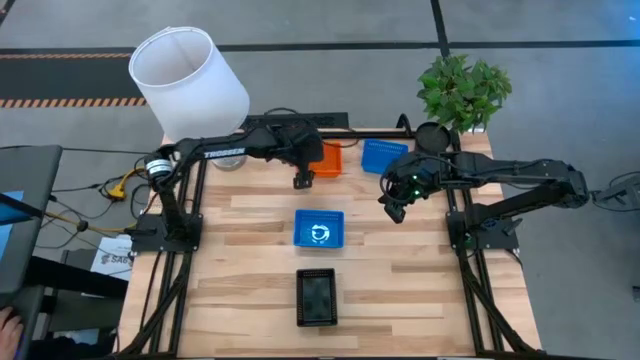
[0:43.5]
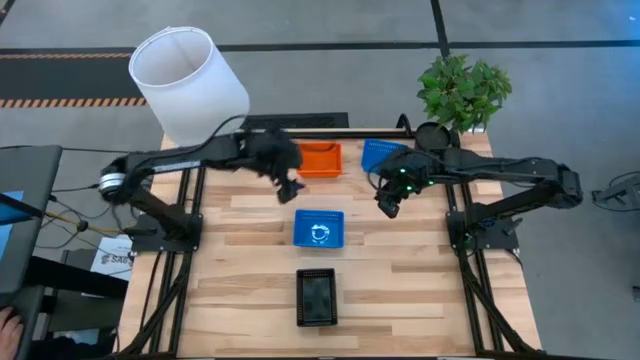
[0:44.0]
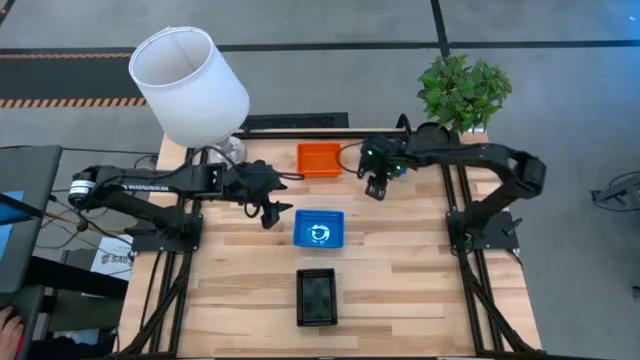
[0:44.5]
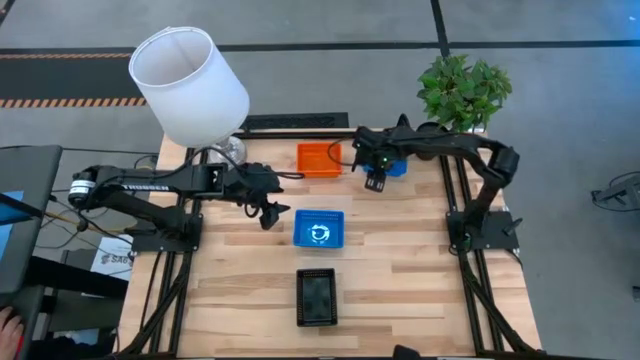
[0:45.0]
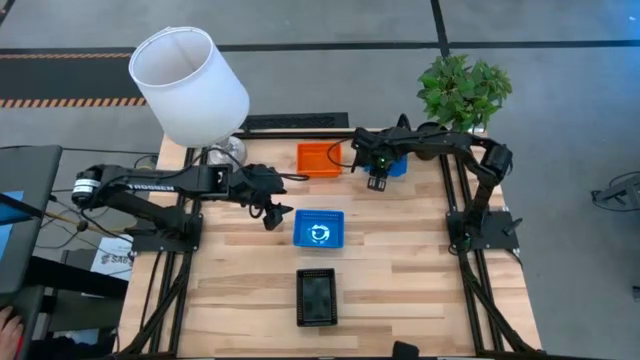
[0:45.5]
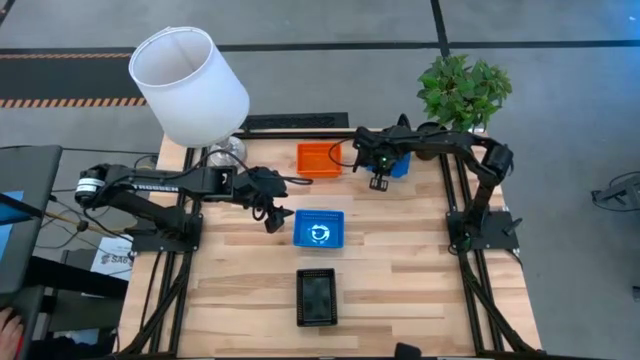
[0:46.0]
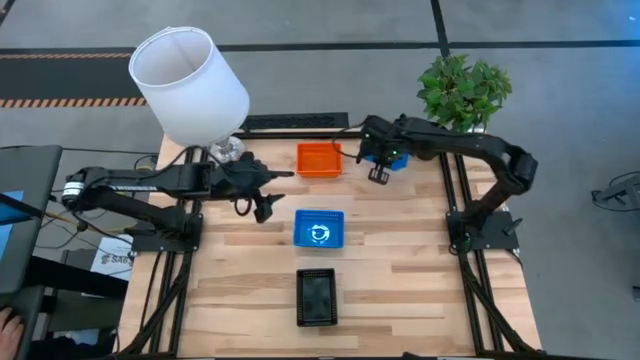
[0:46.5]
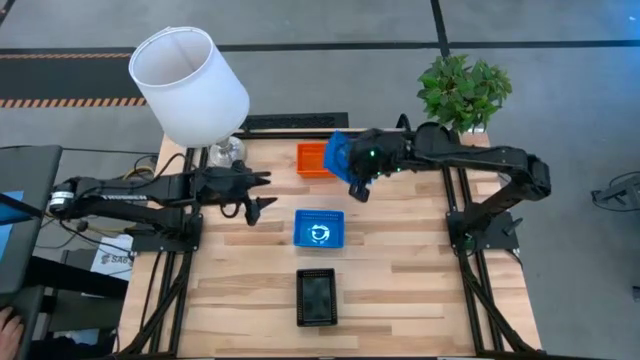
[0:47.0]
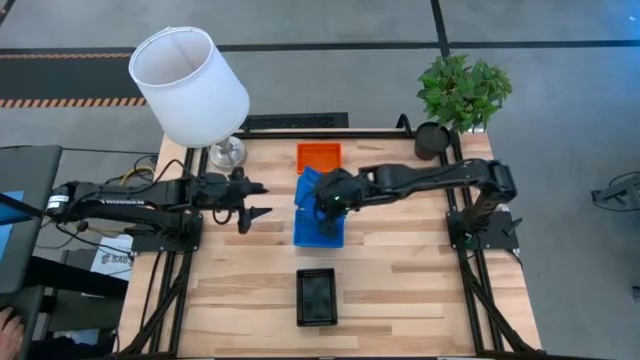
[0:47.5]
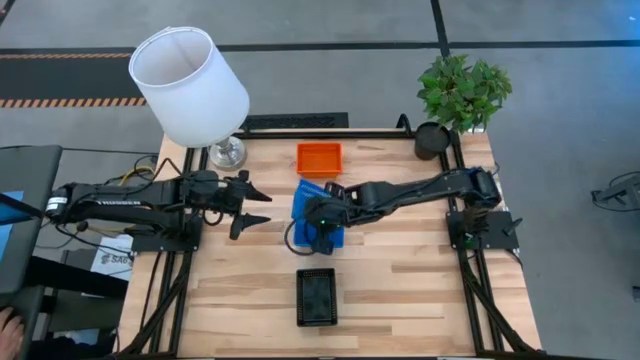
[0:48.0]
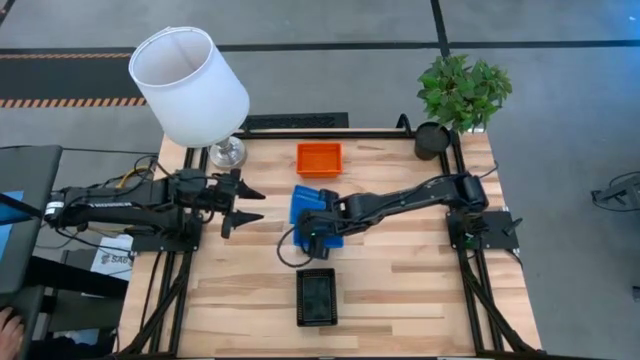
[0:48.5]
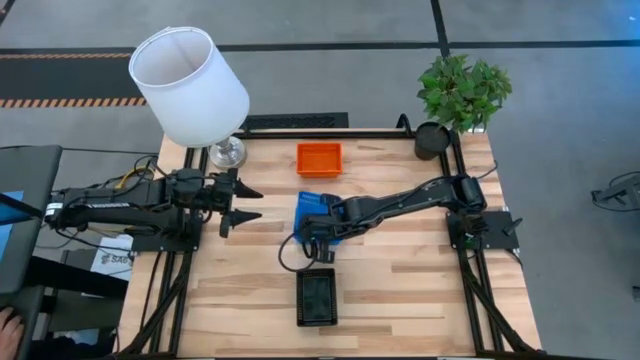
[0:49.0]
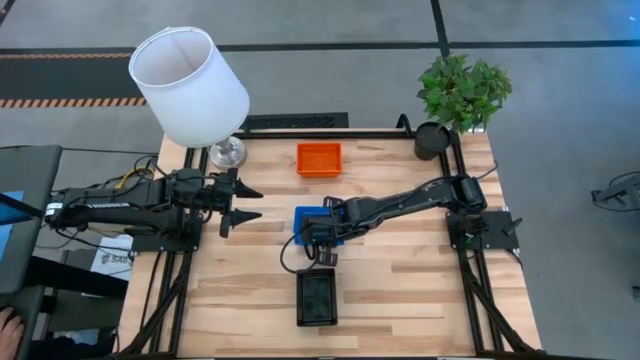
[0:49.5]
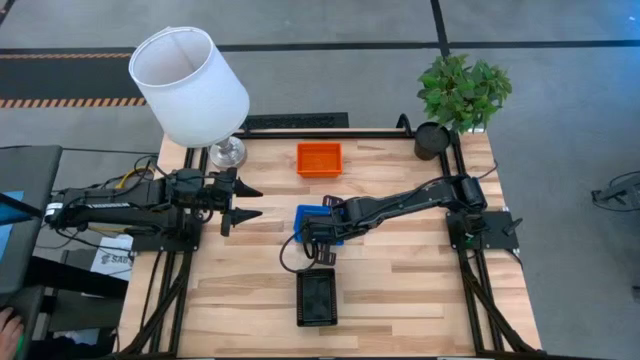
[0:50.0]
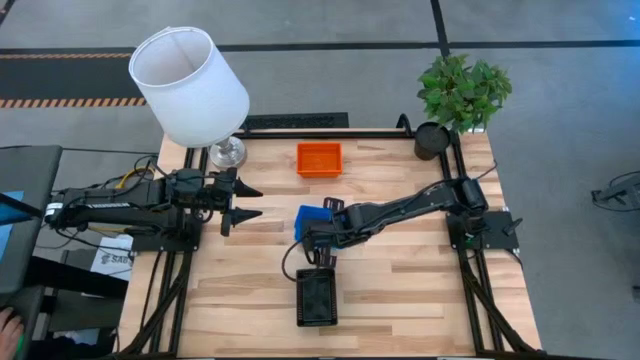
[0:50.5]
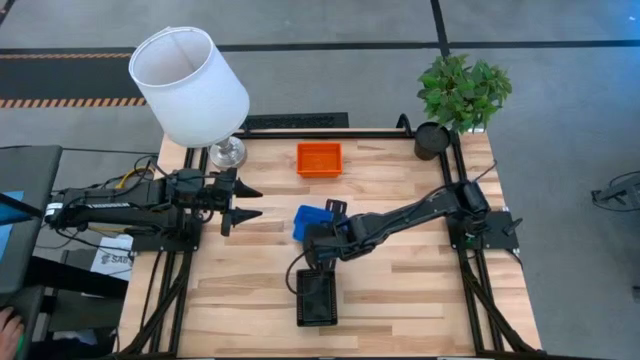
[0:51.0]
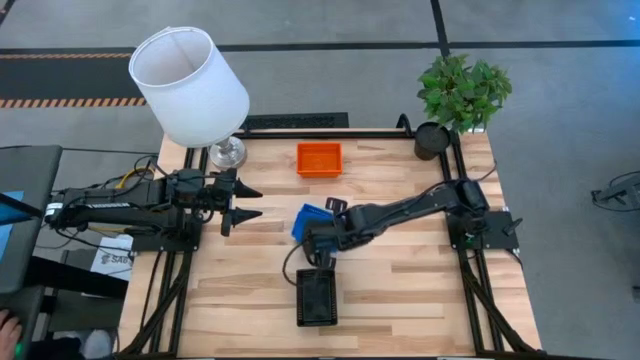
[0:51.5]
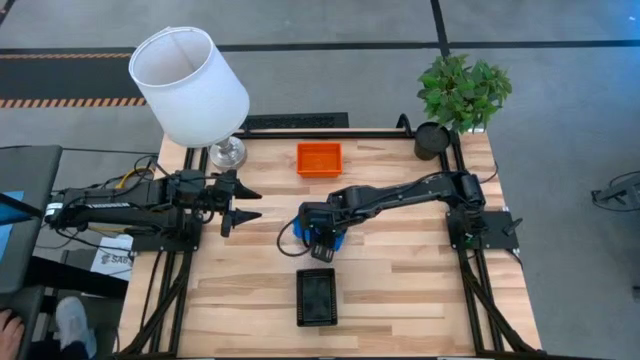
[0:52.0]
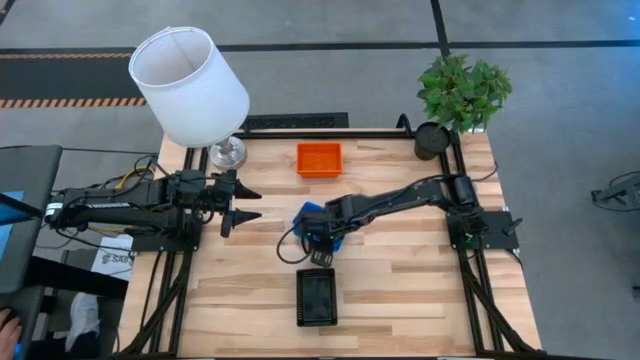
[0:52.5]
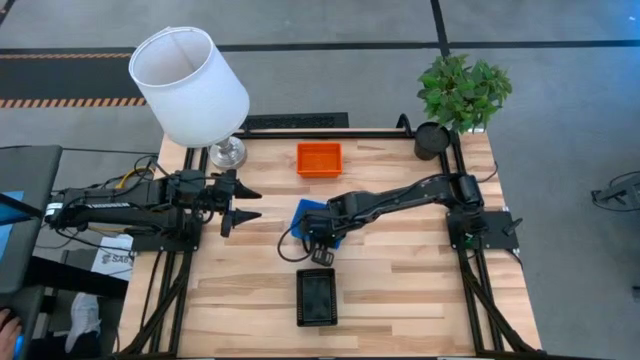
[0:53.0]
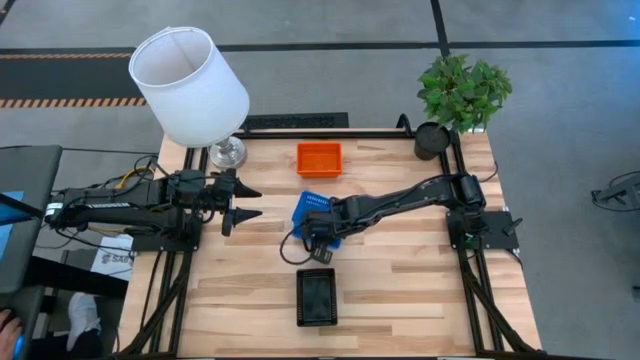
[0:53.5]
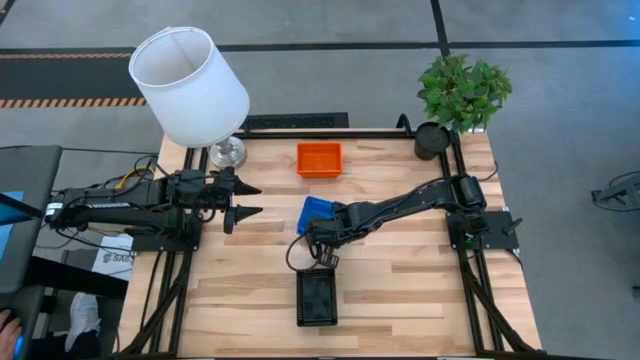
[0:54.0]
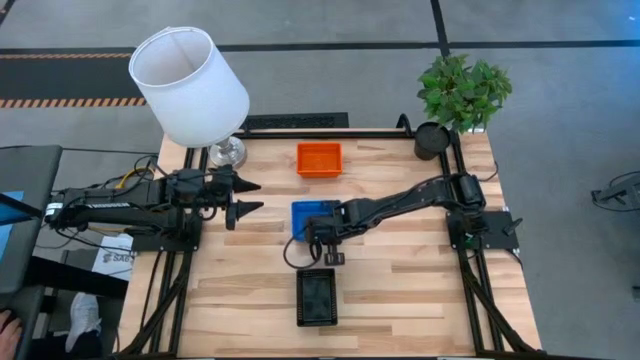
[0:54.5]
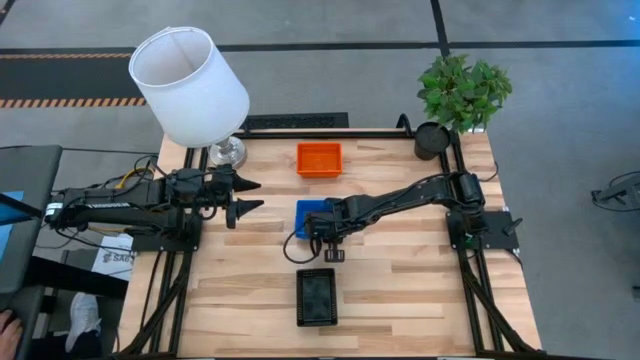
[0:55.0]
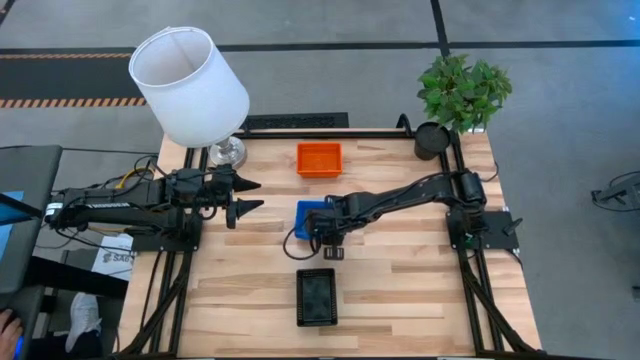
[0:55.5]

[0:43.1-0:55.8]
Stack the top blue bin on the stacked blue bins

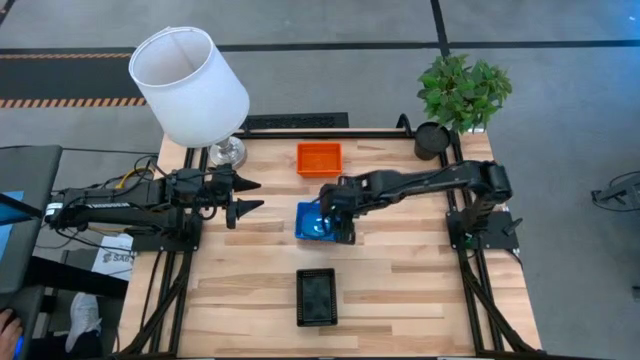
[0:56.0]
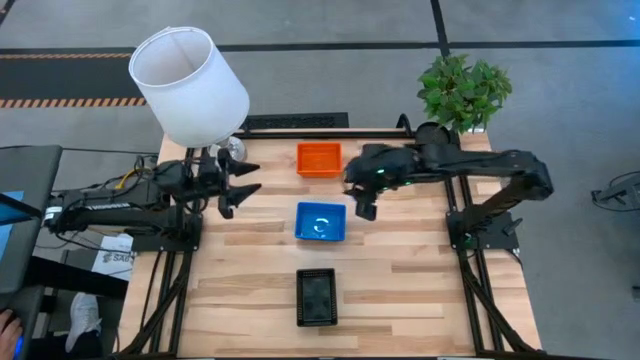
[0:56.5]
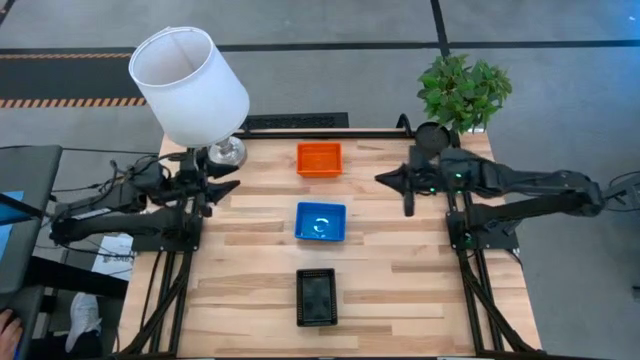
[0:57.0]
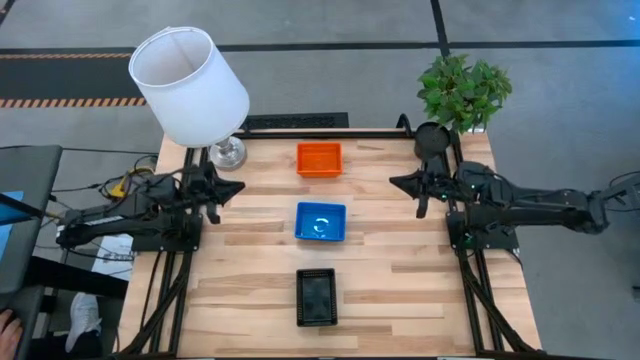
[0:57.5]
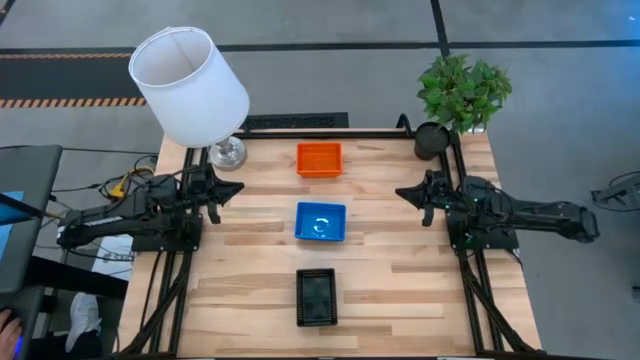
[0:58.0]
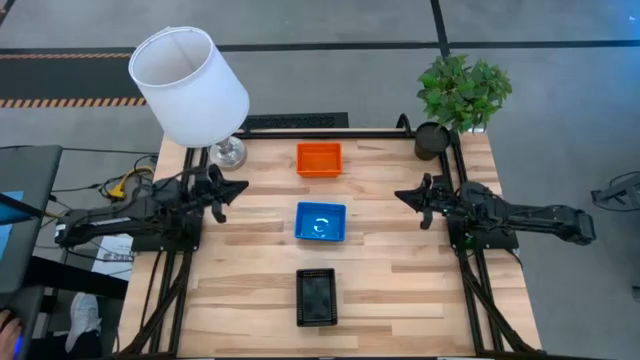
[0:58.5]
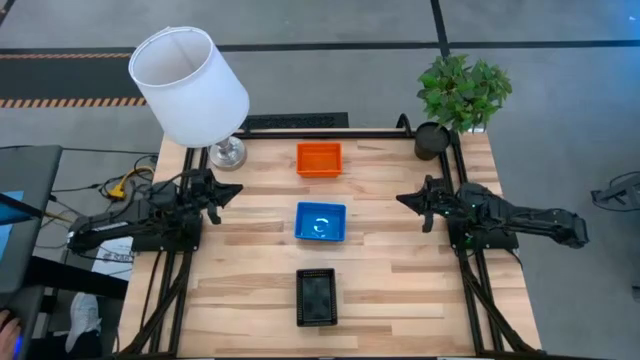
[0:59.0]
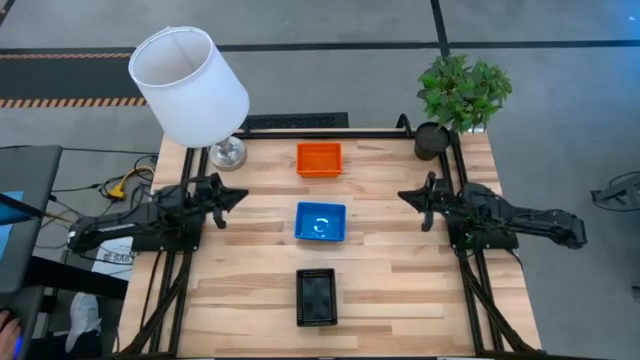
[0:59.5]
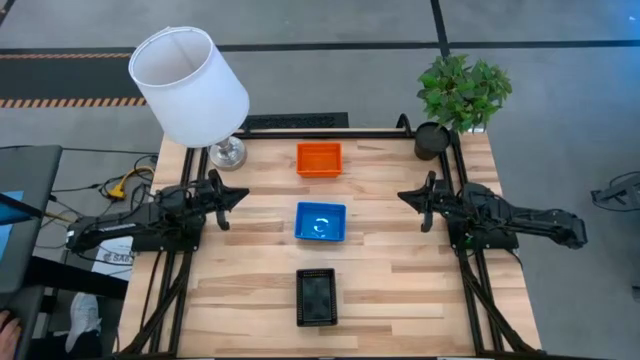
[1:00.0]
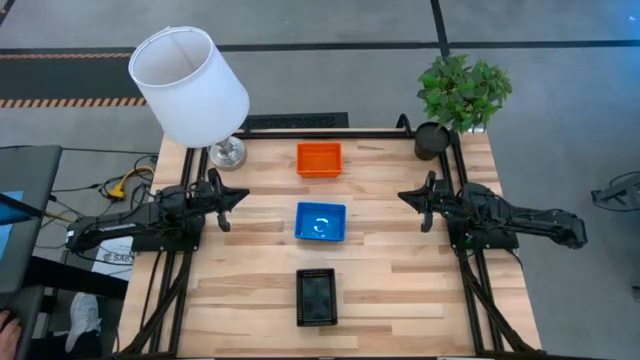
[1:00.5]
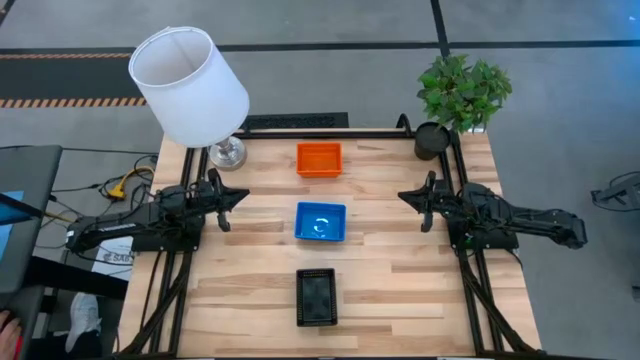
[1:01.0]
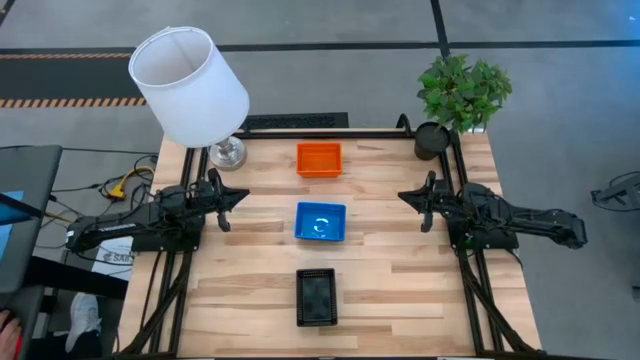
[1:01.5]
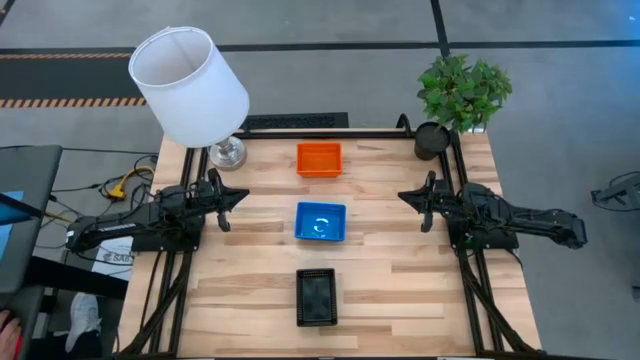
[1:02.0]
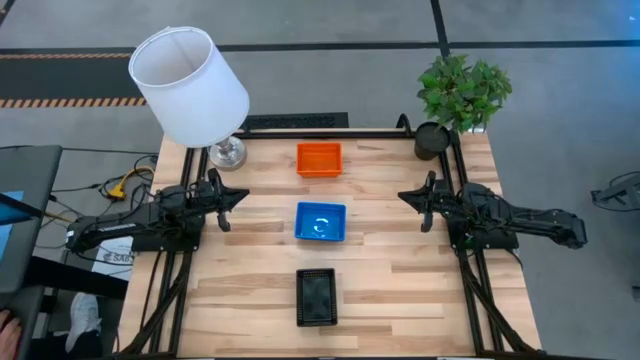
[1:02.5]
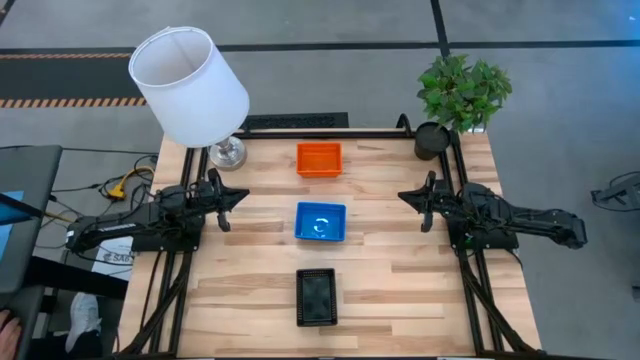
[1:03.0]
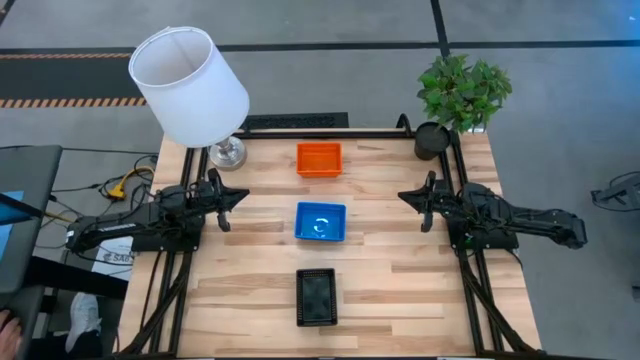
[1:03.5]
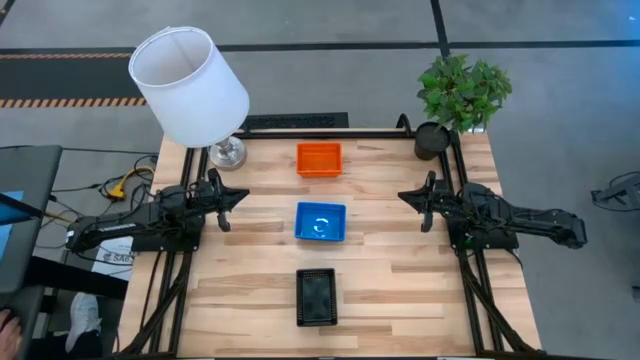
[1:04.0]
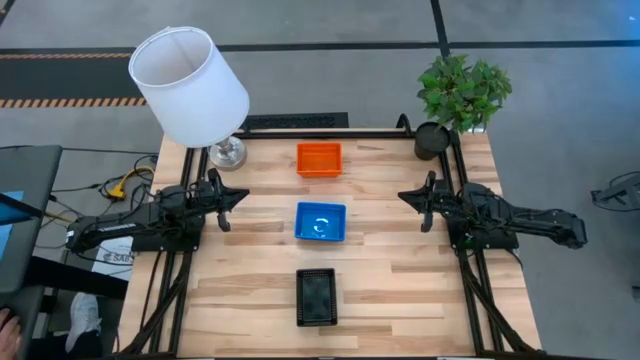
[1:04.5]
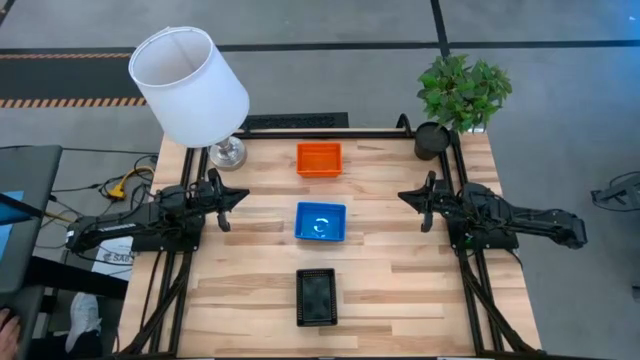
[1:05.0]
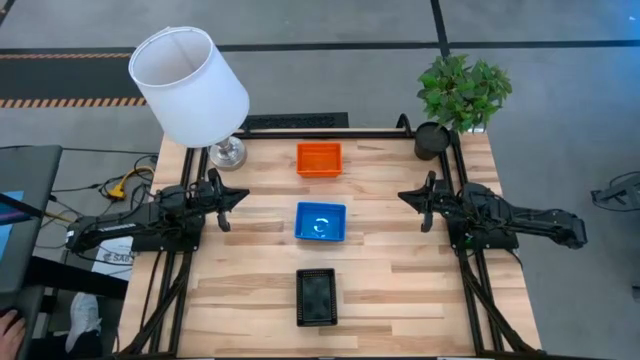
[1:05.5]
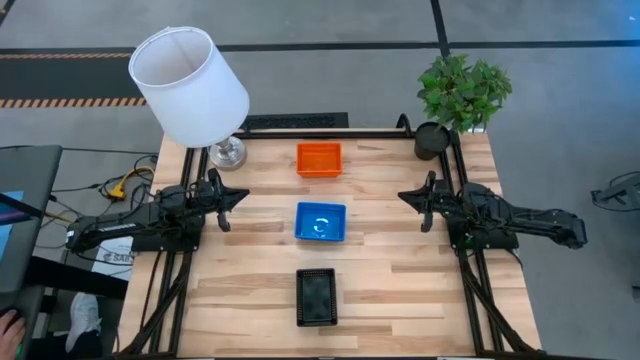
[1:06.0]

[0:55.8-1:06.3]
Return to Home Position
